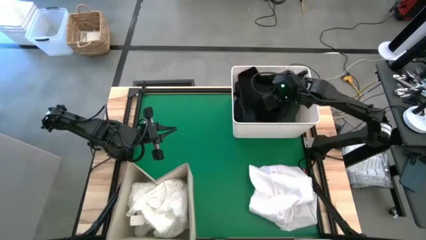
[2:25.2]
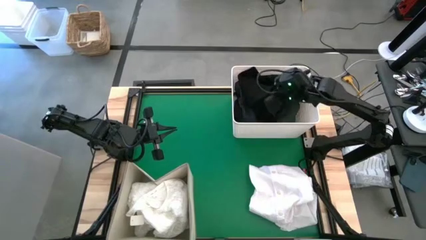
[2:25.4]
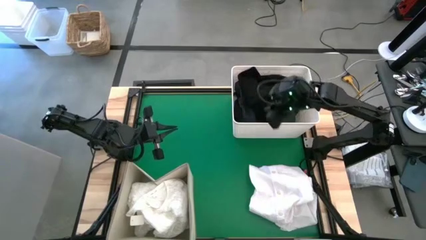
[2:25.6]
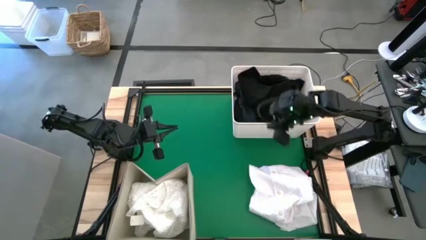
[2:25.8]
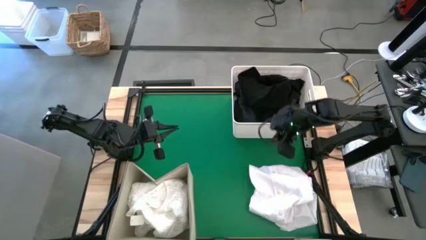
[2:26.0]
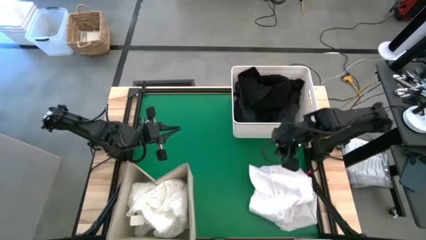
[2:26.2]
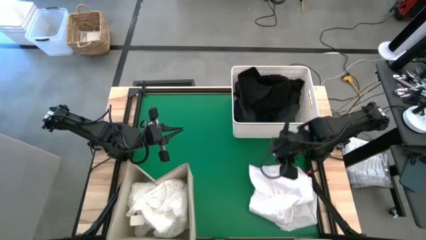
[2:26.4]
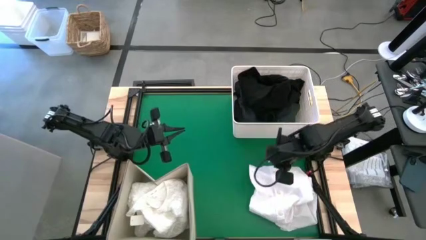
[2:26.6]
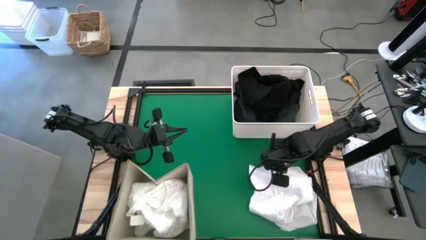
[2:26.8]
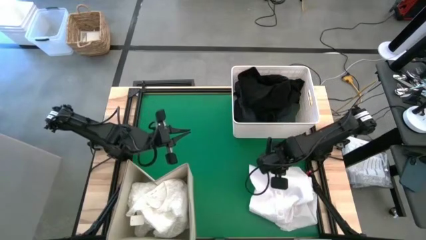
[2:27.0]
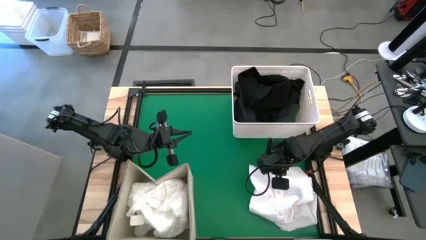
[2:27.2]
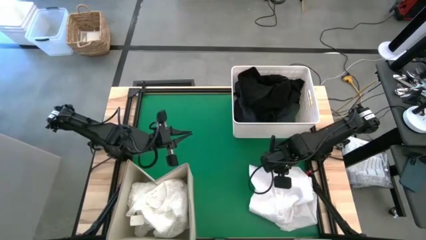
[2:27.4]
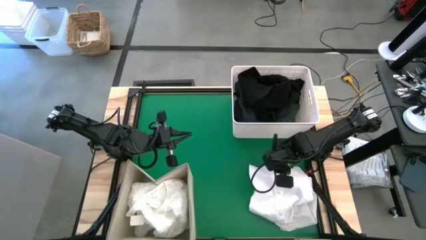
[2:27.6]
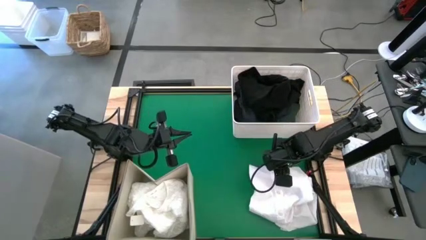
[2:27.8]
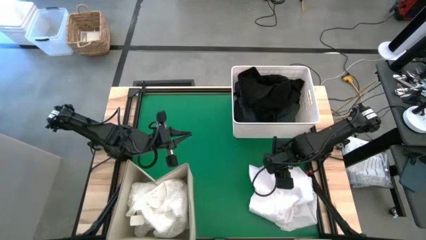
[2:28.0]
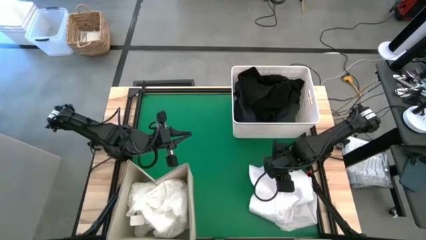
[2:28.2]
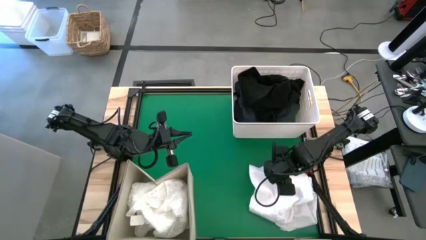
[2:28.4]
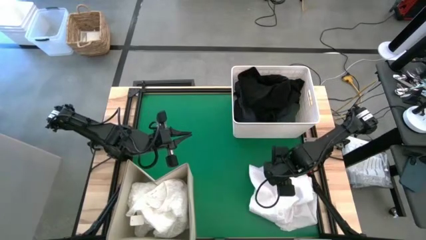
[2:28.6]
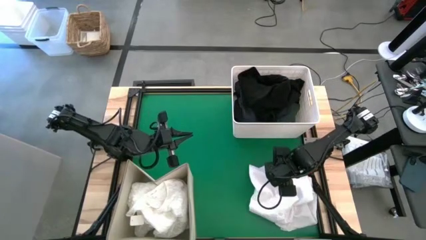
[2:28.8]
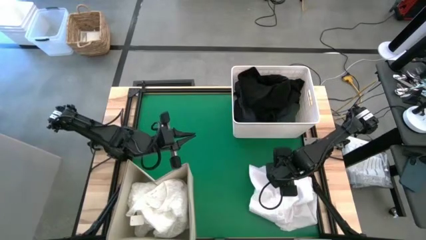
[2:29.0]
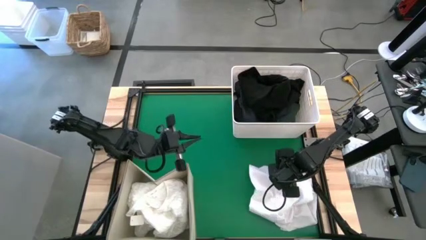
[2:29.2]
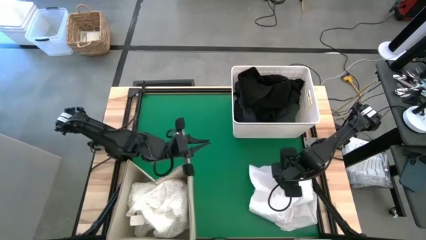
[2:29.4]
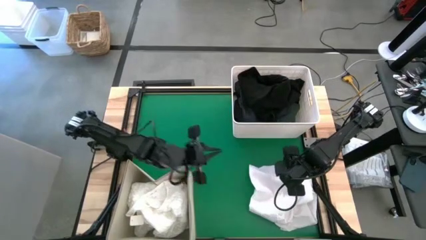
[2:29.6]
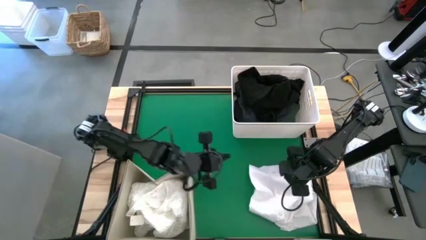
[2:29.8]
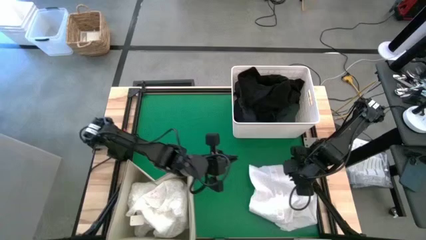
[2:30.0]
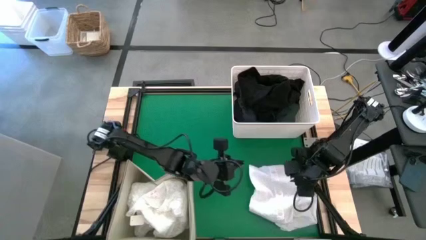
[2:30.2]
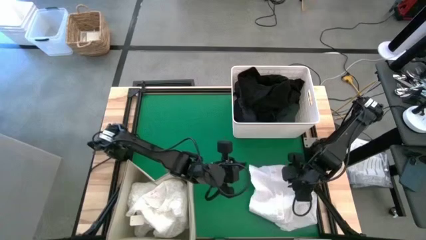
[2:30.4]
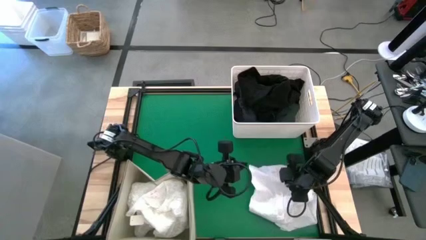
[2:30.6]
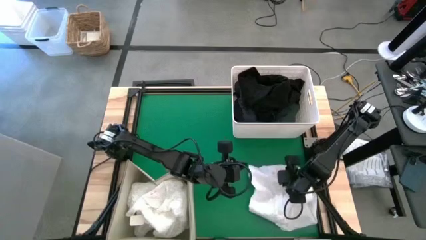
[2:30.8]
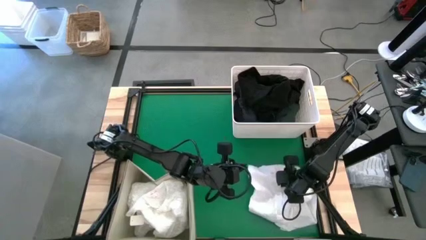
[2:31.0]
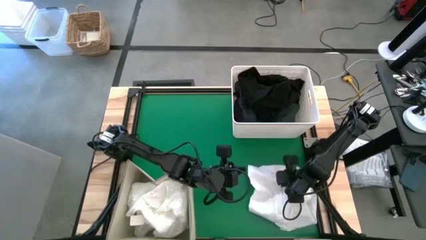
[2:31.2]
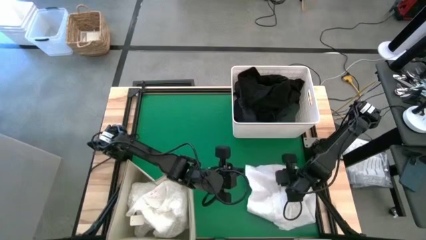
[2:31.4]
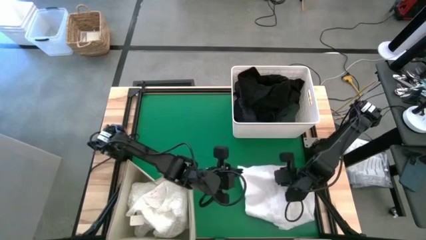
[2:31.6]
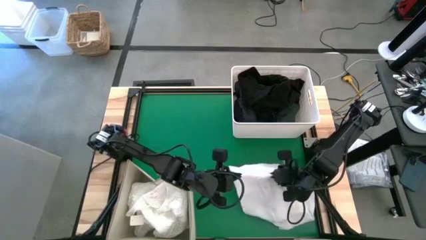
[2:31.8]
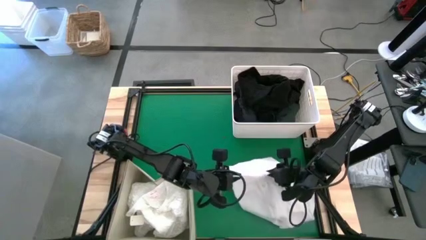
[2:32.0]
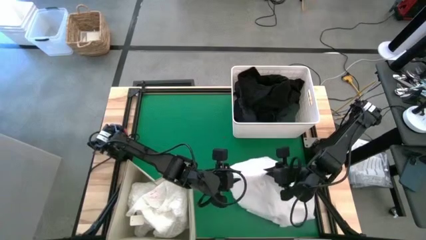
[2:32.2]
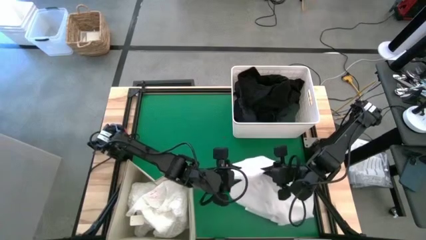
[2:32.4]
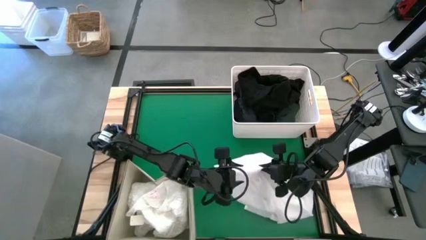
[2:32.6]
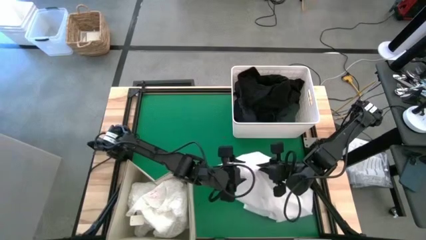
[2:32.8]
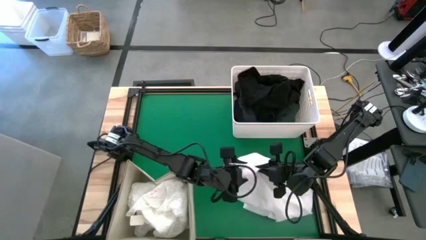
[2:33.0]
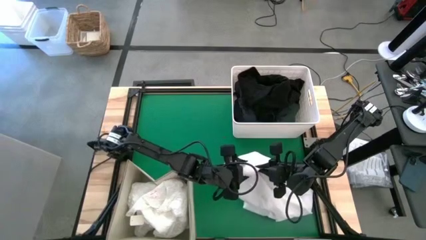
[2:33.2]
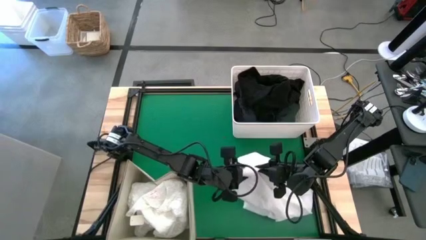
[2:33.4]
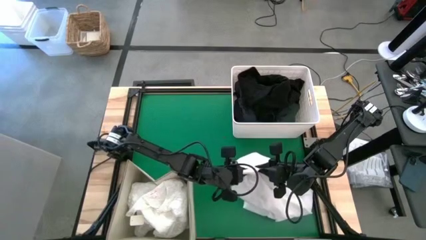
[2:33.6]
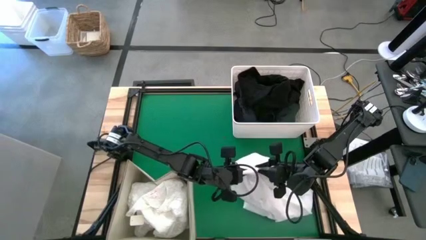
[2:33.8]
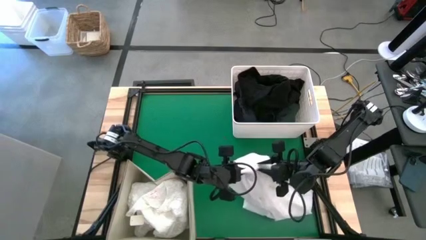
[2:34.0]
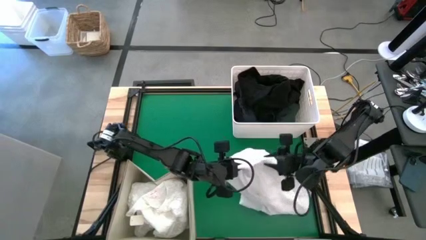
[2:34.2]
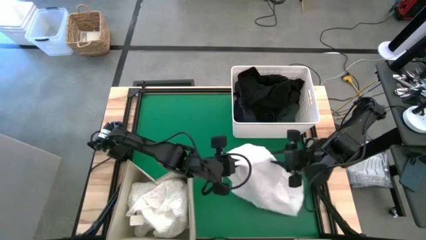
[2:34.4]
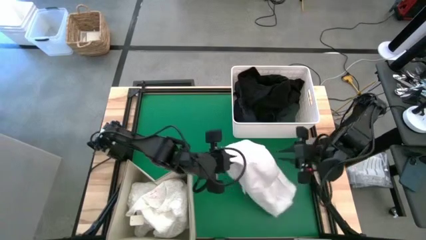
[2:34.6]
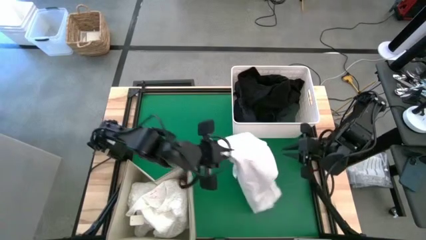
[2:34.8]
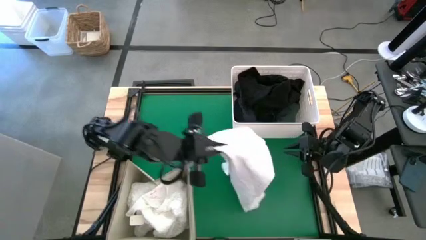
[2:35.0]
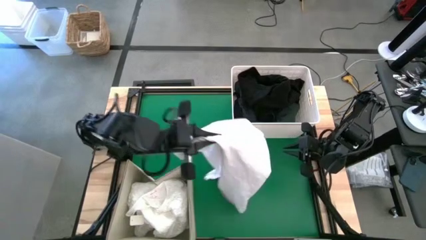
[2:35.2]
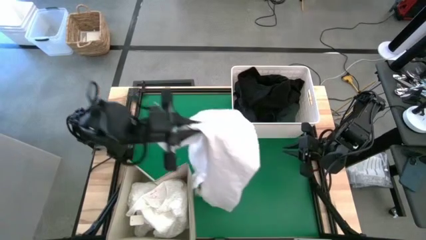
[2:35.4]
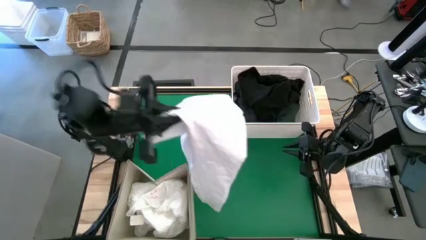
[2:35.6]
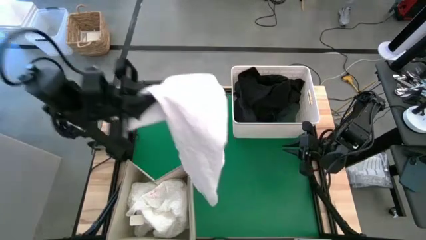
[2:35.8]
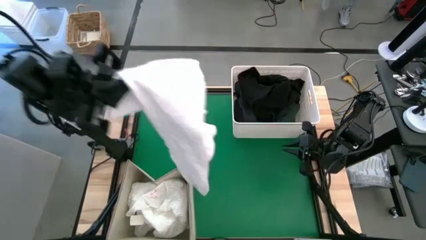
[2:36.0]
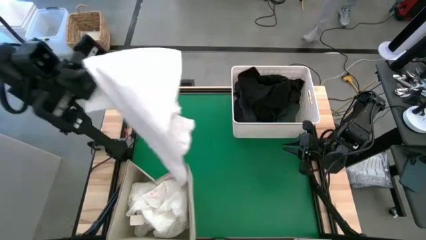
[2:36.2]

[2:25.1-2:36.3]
Task: Sort clothes
Put the white polo shirt into the bottom left white bin

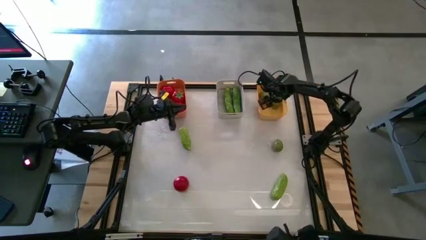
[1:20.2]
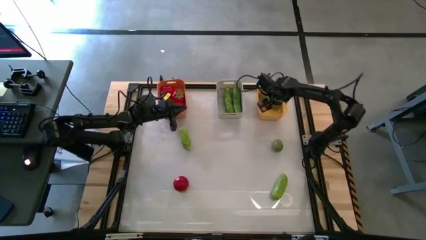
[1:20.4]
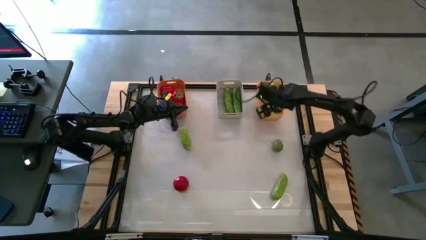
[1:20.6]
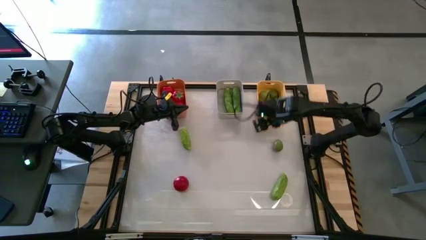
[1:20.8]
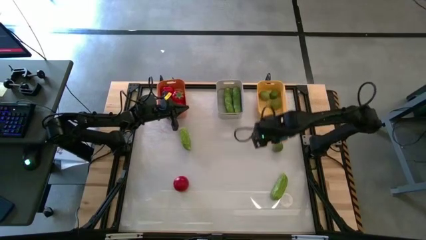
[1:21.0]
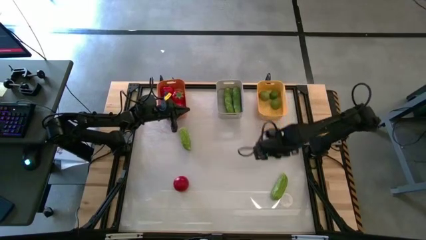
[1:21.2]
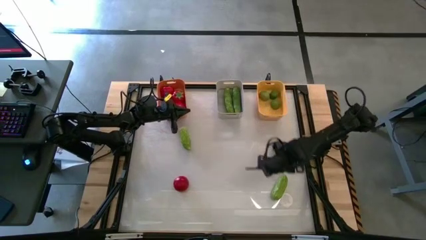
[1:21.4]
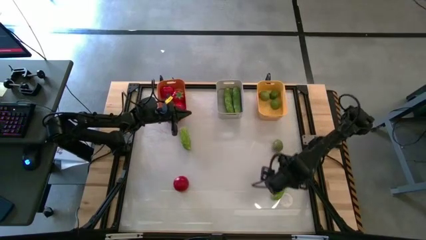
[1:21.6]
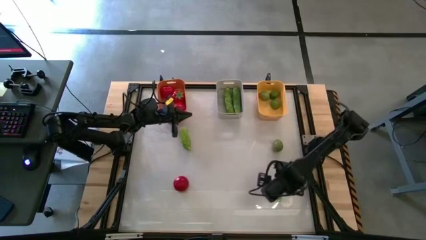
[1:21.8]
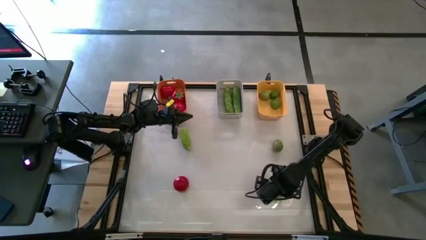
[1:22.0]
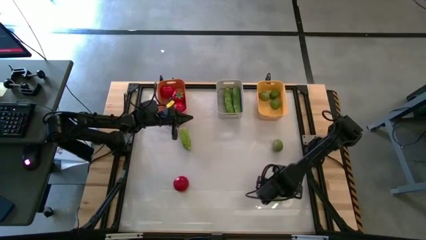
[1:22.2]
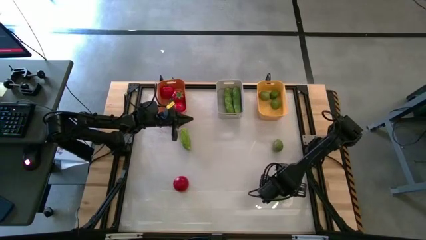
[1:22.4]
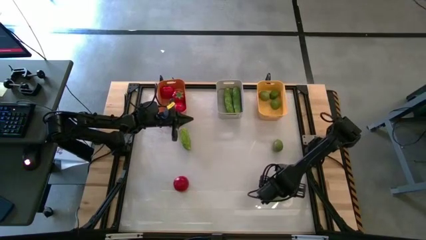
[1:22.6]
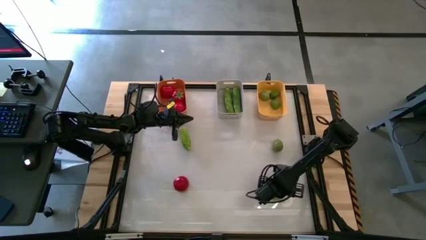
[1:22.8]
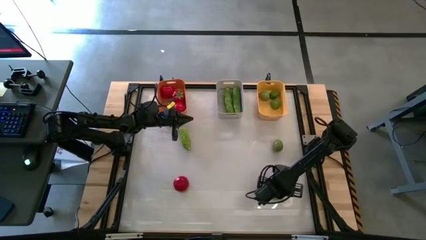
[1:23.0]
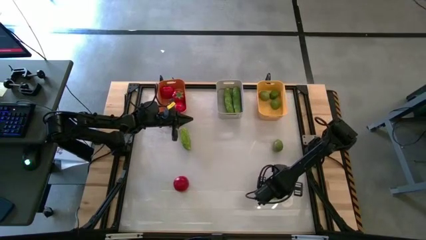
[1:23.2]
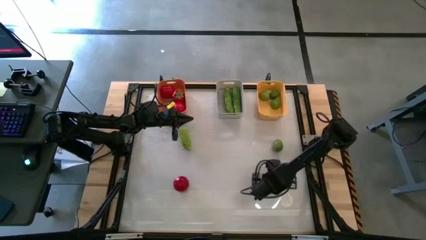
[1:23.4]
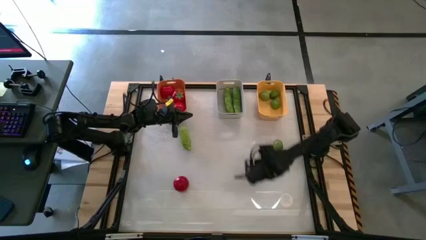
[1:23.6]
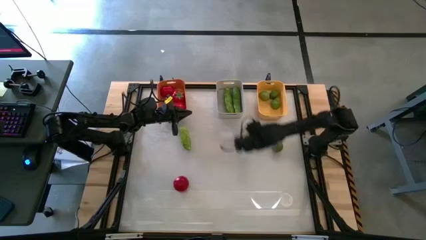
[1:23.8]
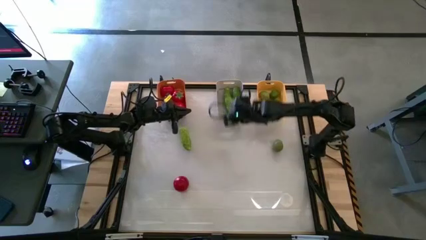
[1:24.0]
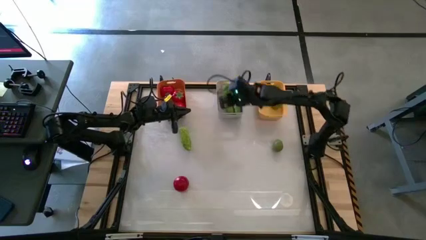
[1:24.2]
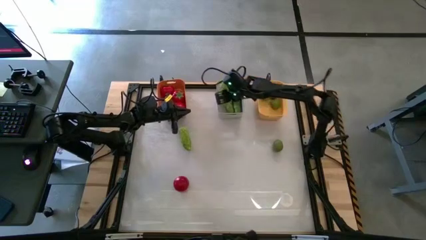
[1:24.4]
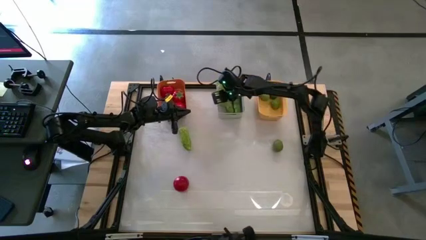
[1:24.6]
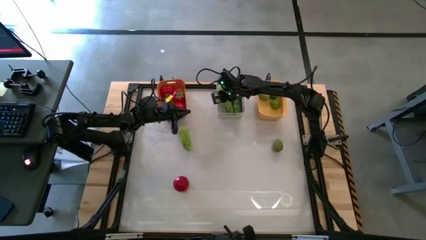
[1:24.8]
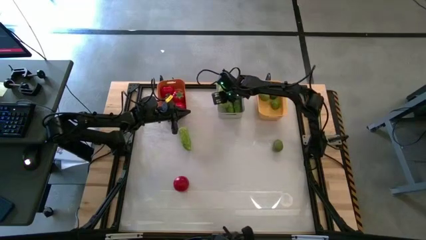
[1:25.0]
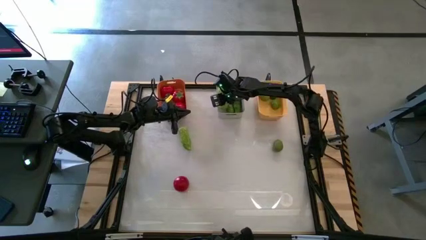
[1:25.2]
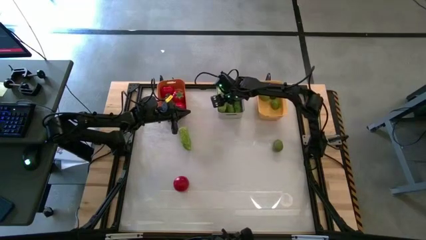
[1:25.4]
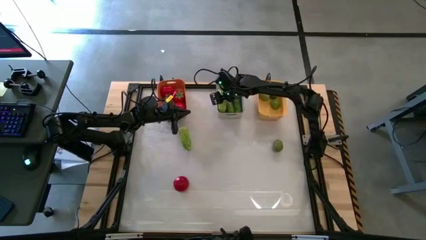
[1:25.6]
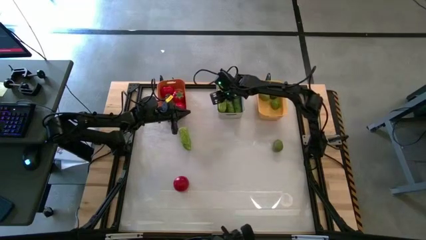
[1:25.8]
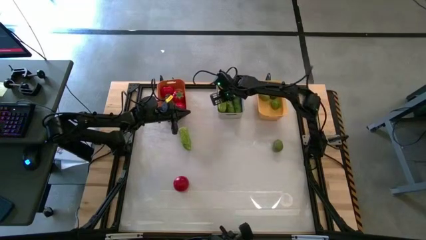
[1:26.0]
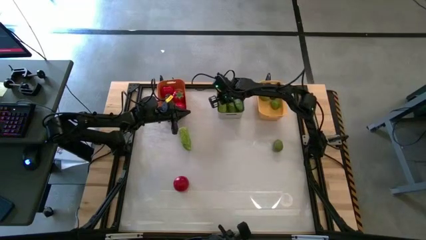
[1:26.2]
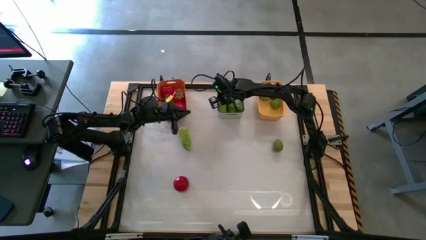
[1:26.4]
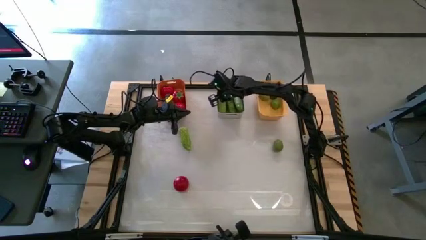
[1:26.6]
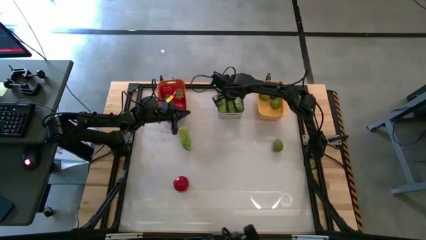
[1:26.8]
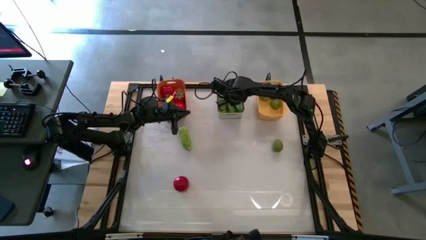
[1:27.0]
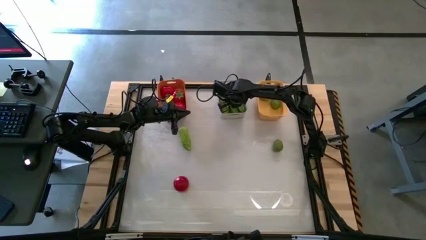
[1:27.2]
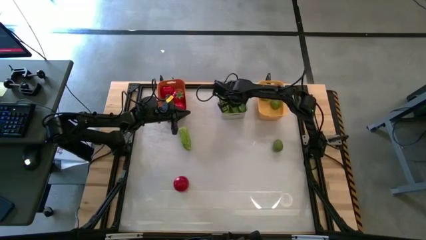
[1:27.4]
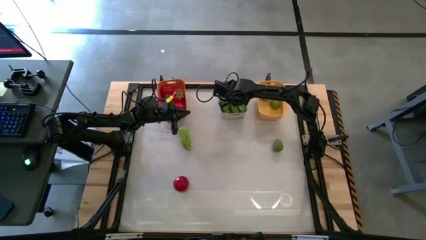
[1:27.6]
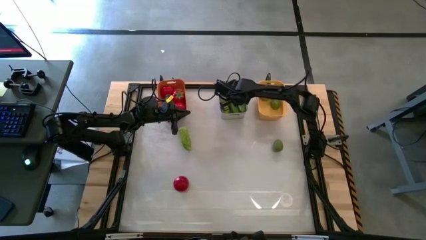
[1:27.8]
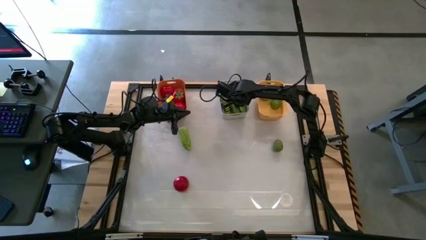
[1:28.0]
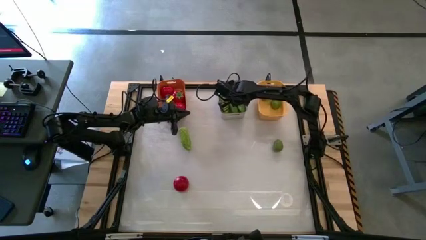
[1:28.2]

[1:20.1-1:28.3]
Task: Sort produce into baskets
Put the bottom cucumber into the gray bin
